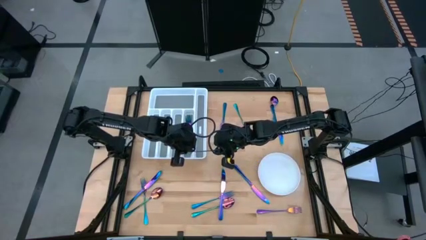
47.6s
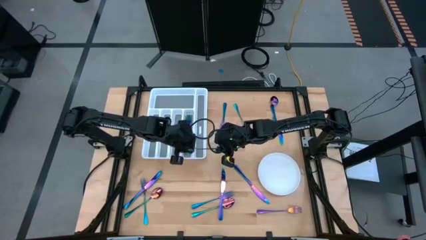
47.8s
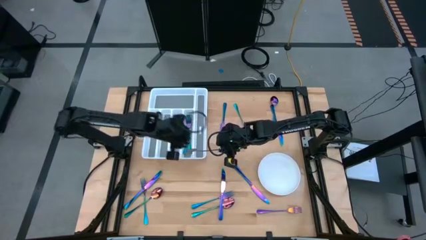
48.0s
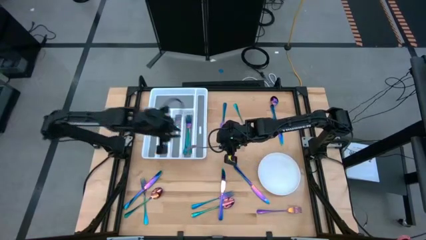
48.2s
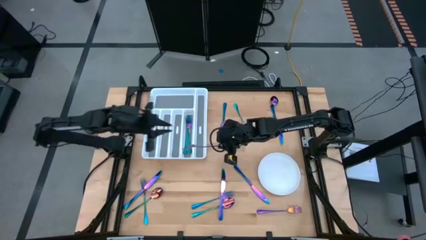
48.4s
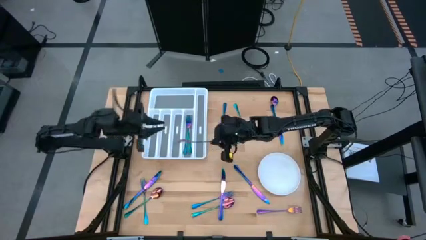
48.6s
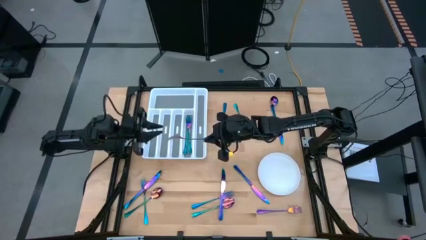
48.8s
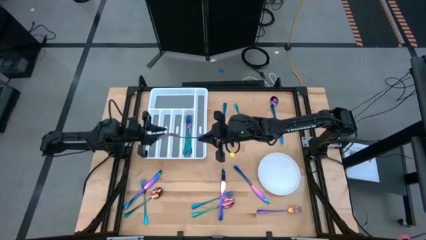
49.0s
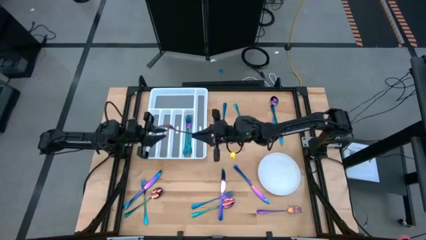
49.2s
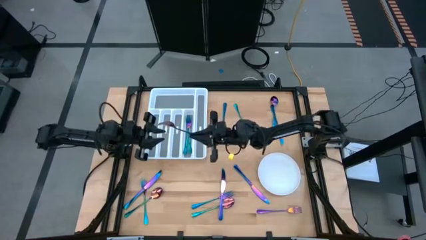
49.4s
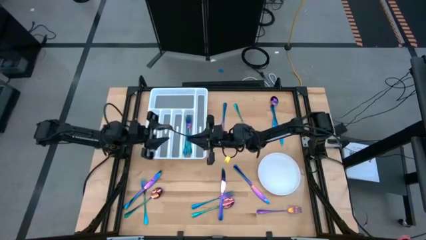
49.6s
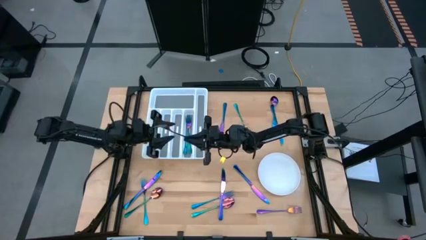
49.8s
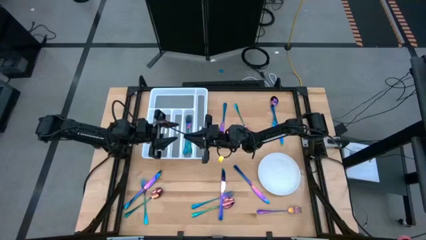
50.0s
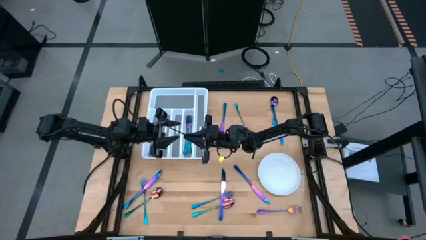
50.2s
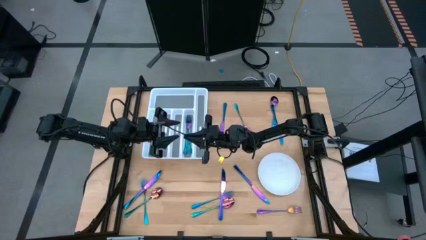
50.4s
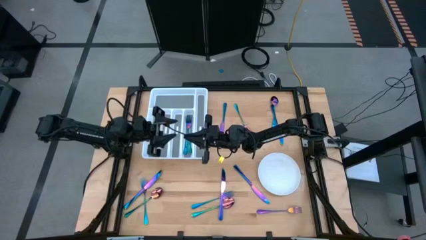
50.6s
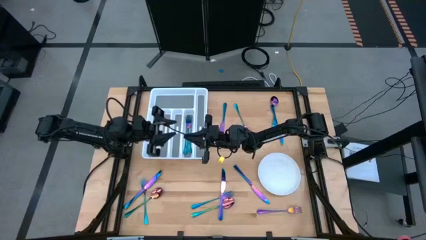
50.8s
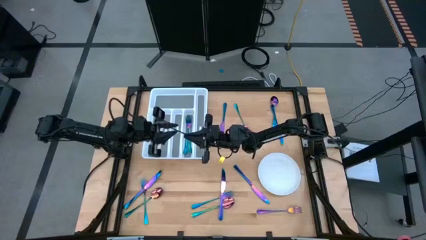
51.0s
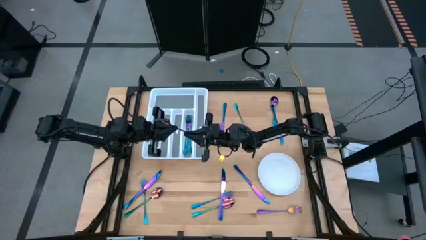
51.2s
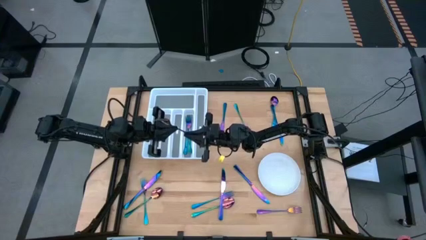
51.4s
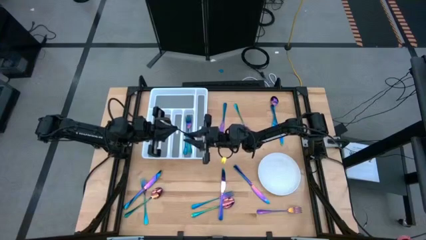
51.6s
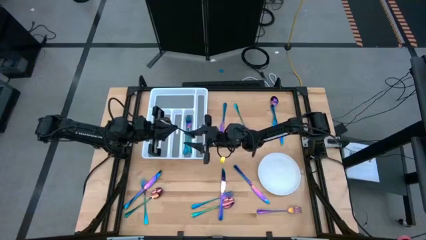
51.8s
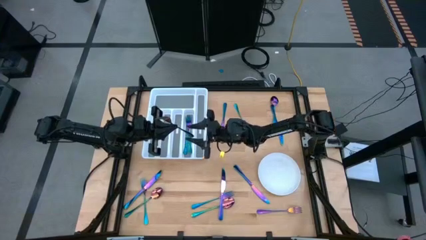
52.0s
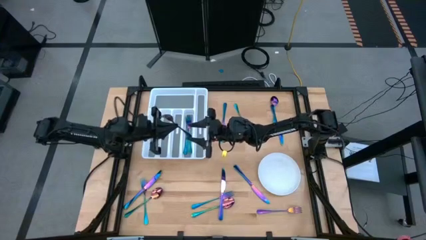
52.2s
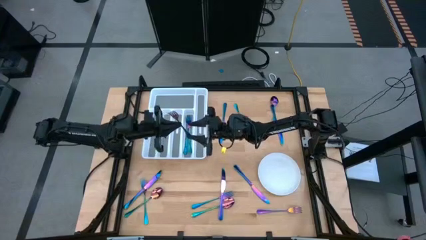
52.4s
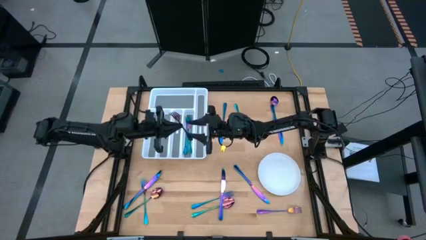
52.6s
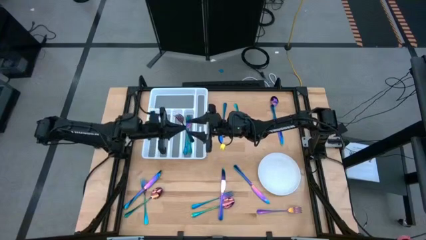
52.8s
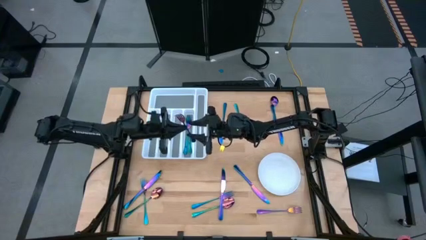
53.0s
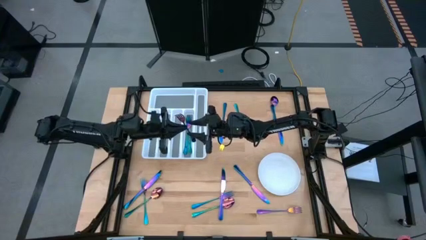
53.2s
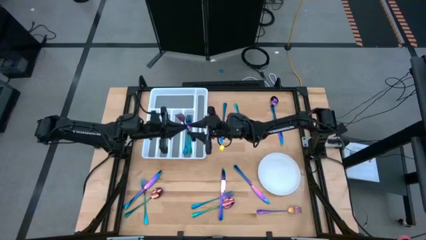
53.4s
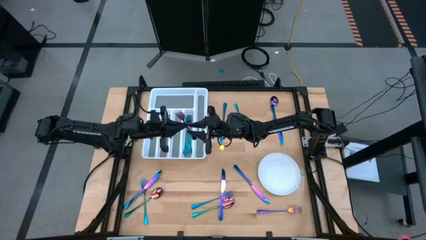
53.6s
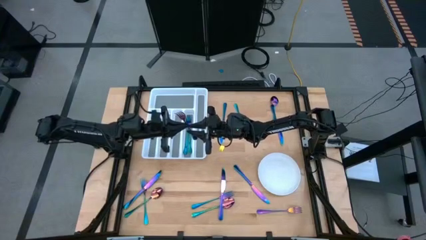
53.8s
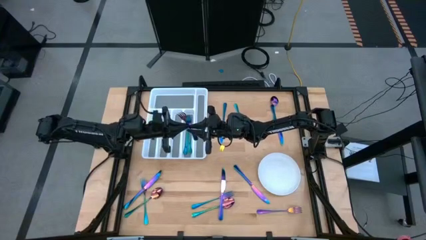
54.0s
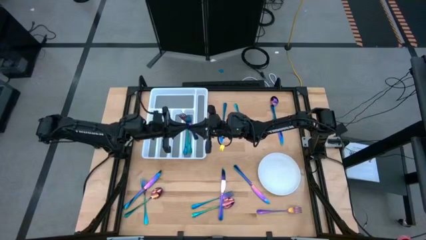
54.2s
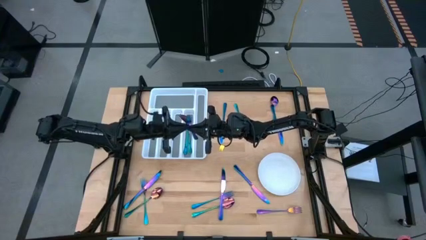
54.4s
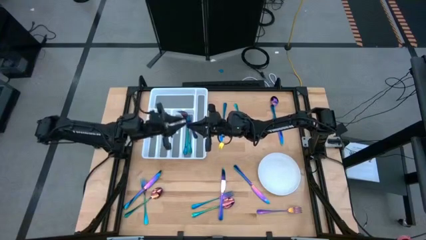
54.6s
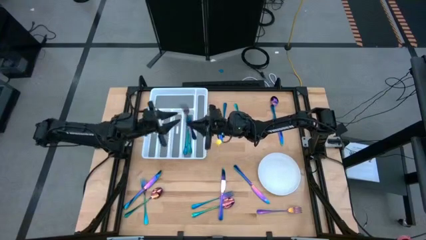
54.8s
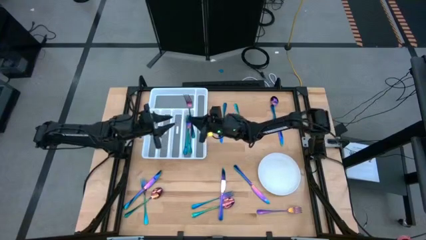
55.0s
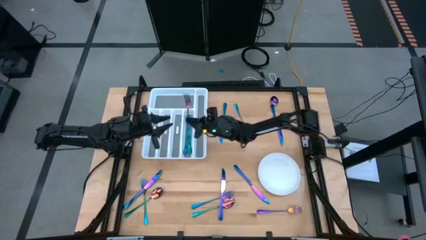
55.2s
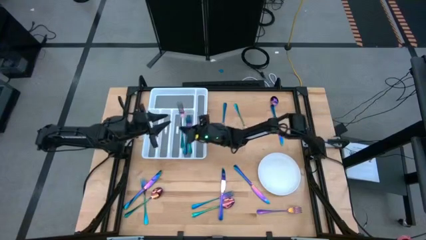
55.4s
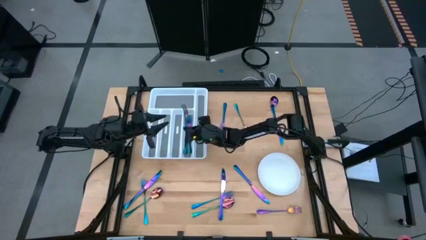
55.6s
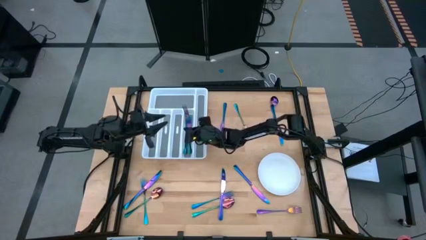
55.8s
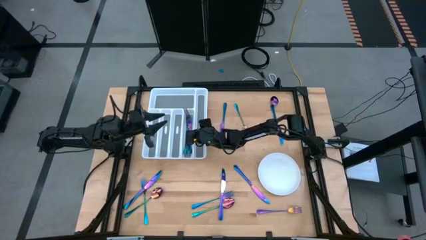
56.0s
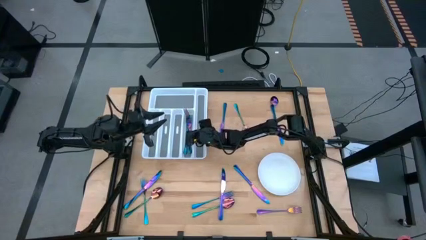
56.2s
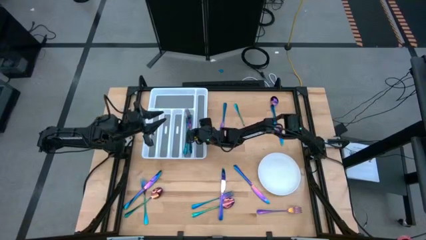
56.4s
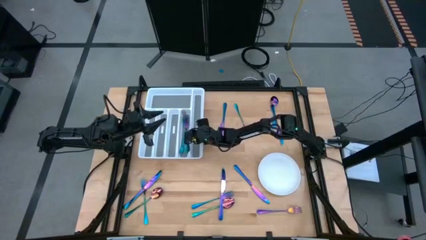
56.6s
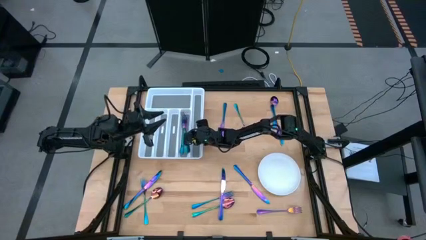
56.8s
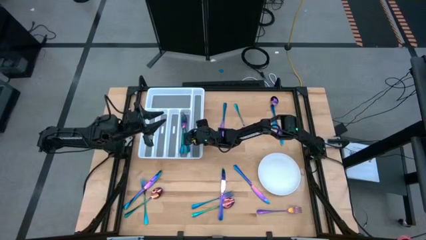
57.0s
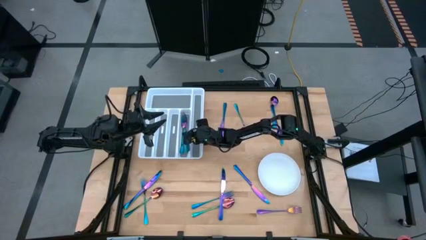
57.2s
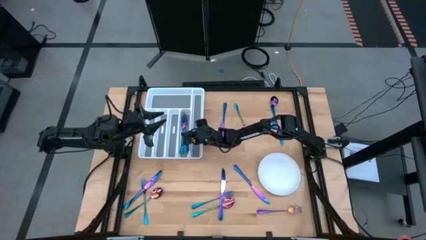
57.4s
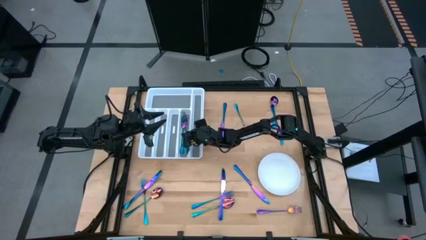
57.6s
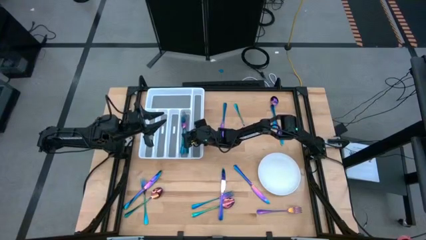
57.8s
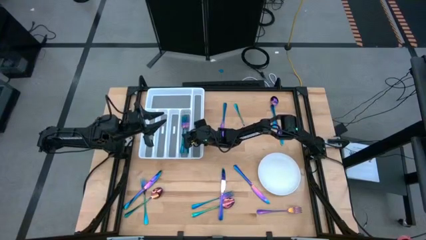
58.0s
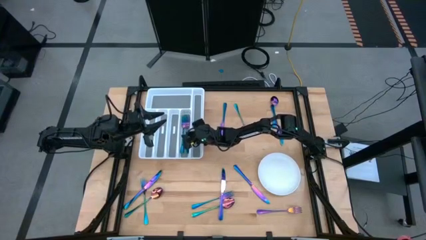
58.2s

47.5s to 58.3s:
Task: Sort silverware
Put the iridescent fork into the white silverware tray

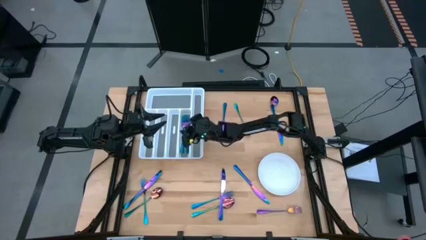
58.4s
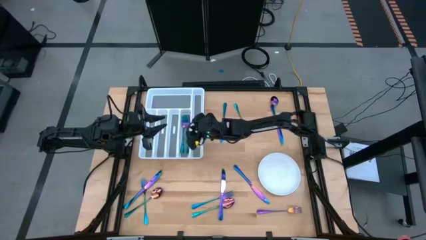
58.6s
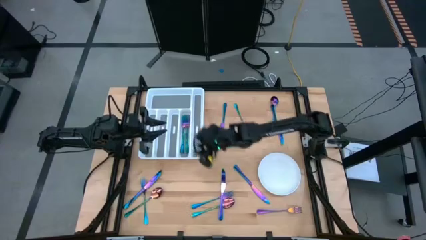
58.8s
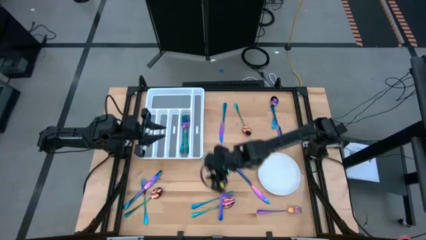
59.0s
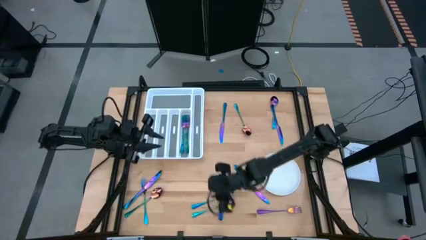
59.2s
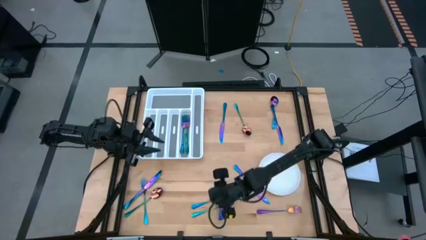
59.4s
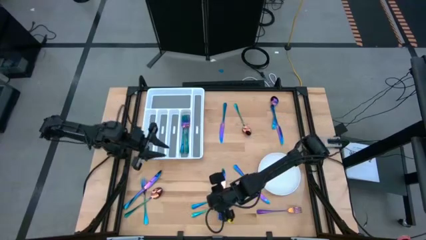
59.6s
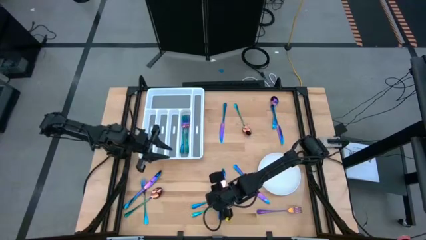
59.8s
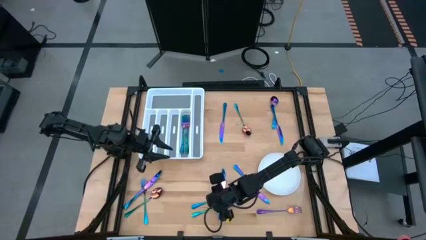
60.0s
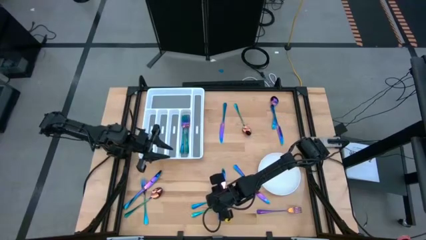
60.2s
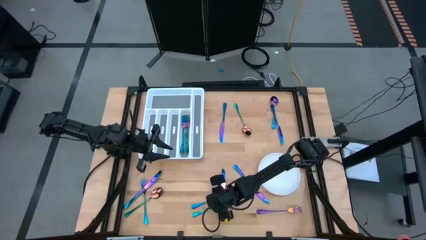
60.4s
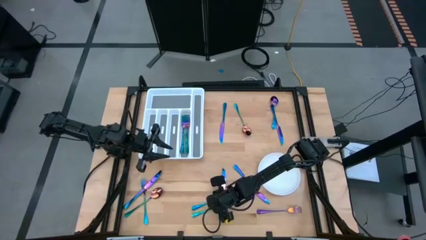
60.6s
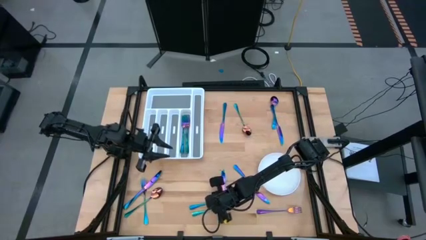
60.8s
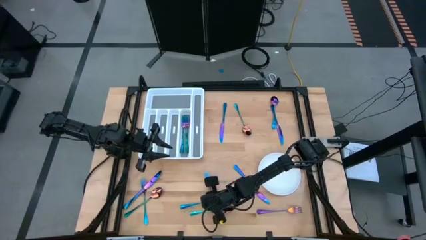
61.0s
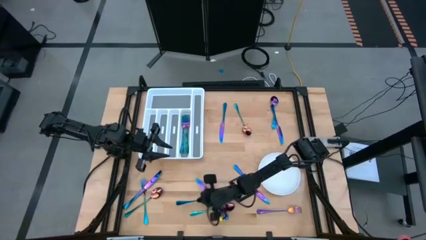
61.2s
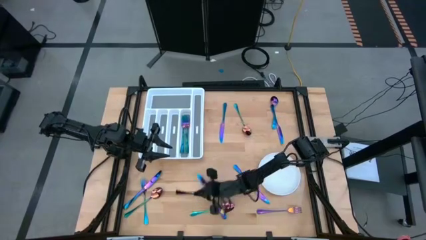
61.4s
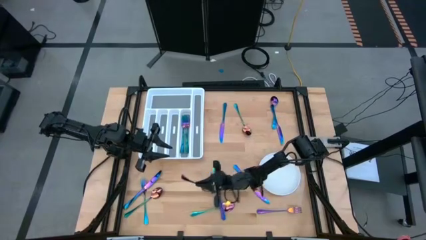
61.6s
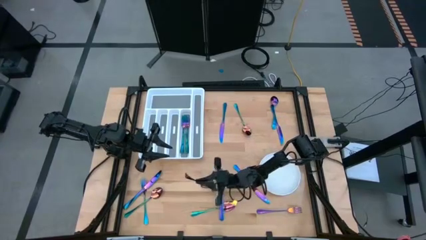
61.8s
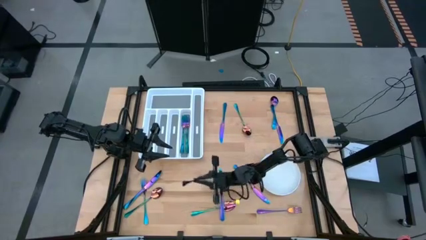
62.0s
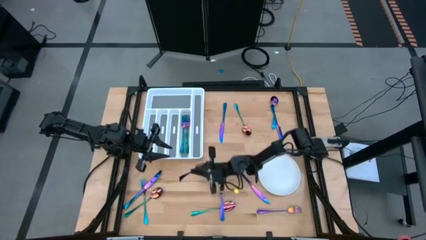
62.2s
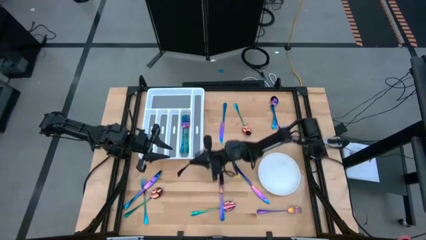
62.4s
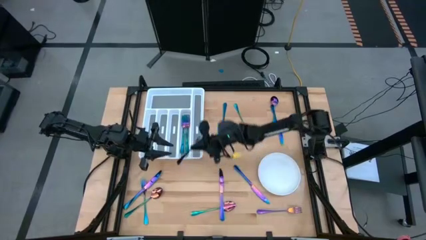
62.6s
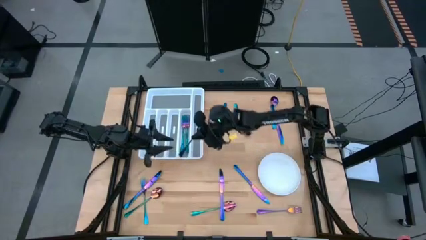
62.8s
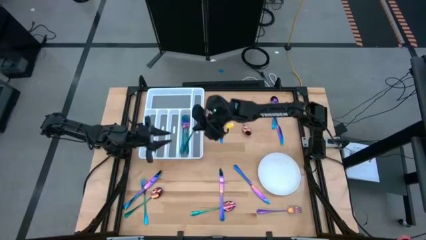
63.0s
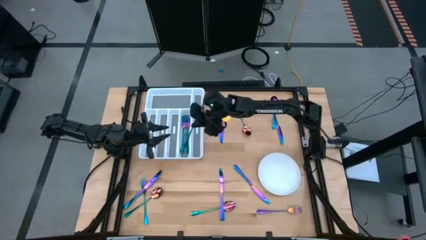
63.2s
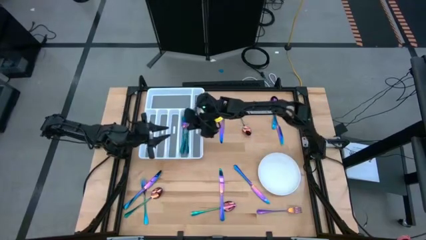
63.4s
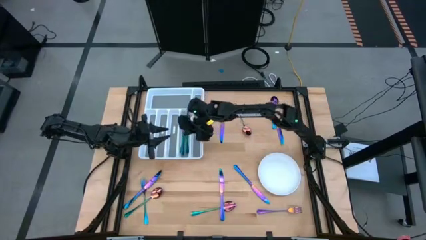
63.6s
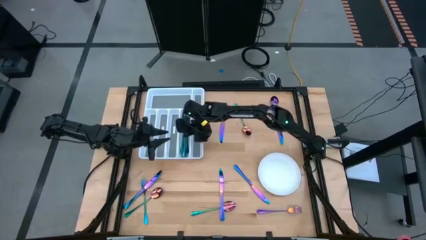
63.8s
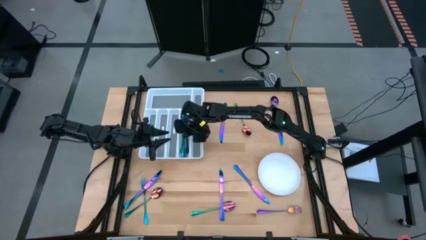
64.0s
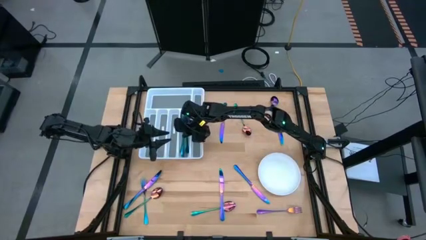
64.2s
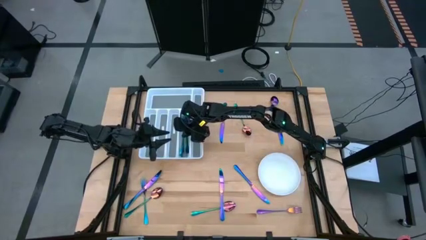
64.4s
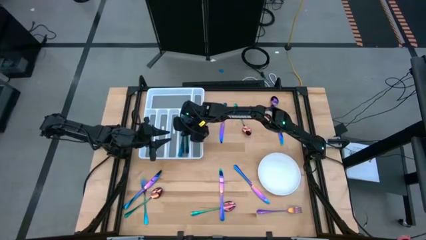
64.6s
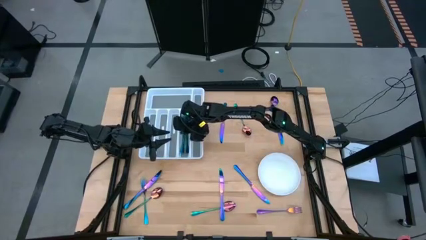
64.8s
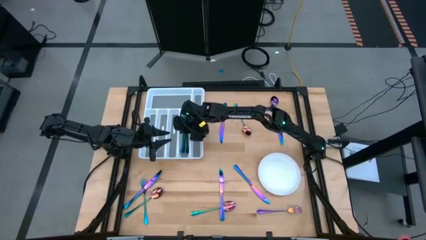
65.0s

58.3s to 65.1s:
Put the iridescent fork into the white silverware tray
